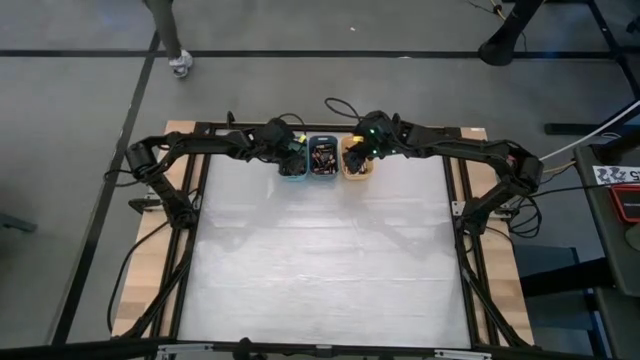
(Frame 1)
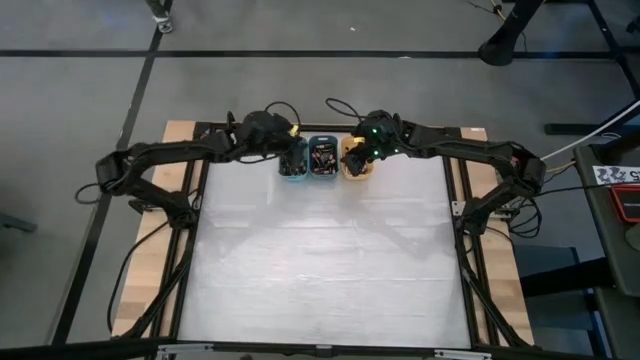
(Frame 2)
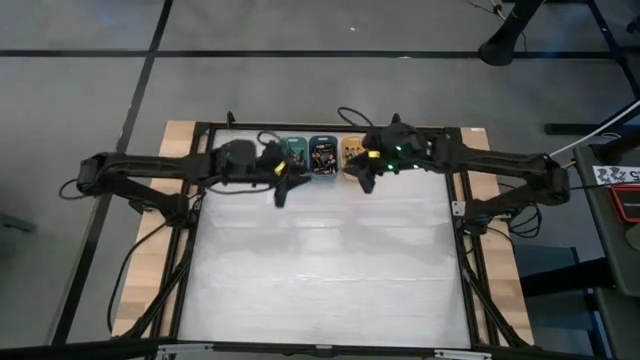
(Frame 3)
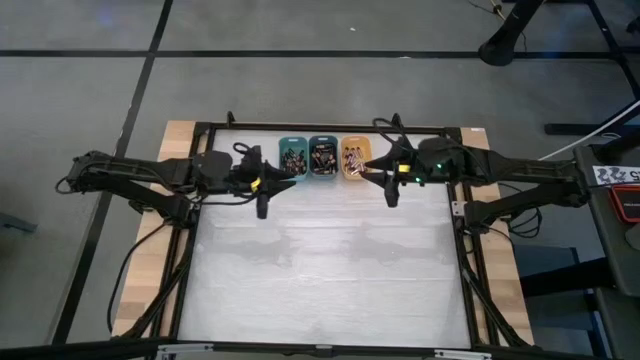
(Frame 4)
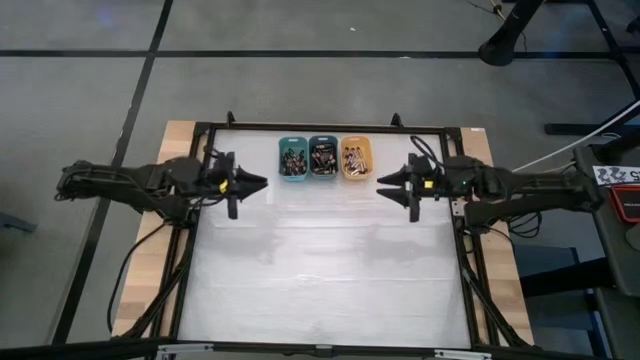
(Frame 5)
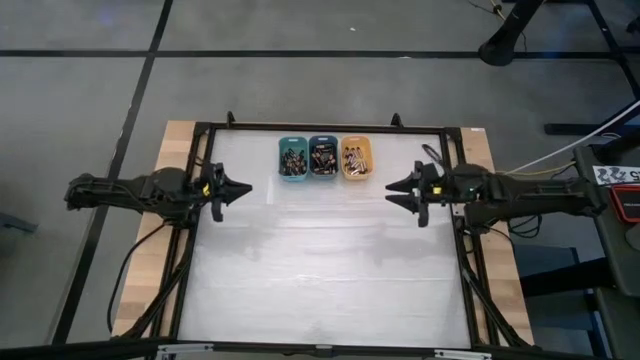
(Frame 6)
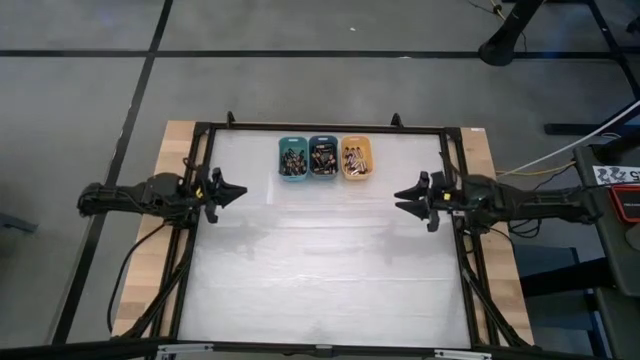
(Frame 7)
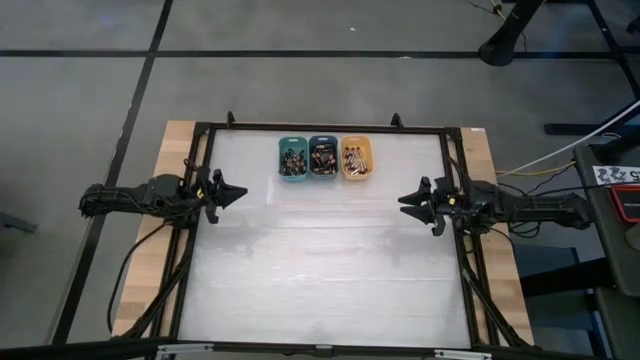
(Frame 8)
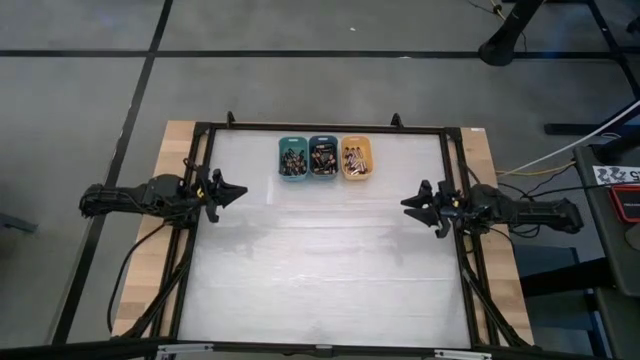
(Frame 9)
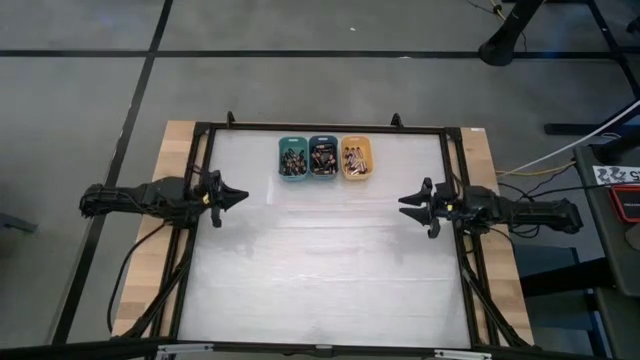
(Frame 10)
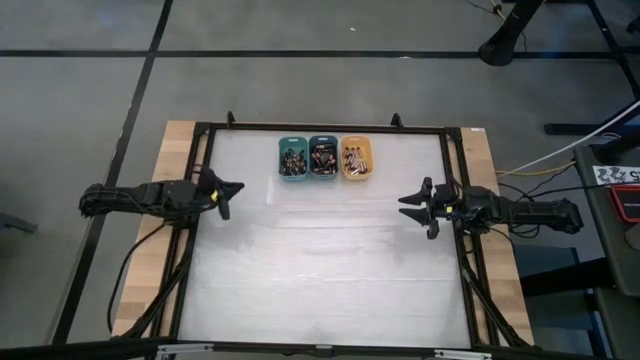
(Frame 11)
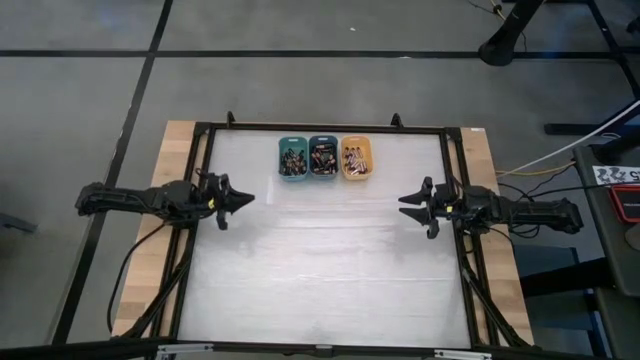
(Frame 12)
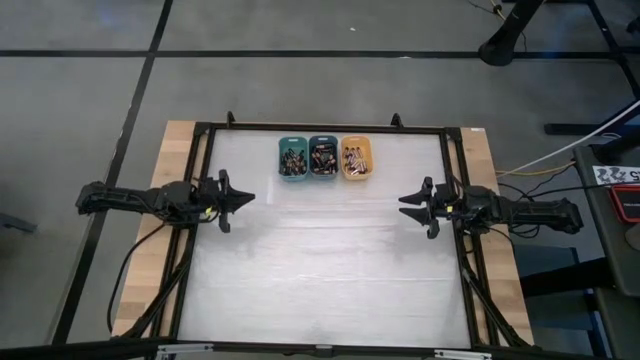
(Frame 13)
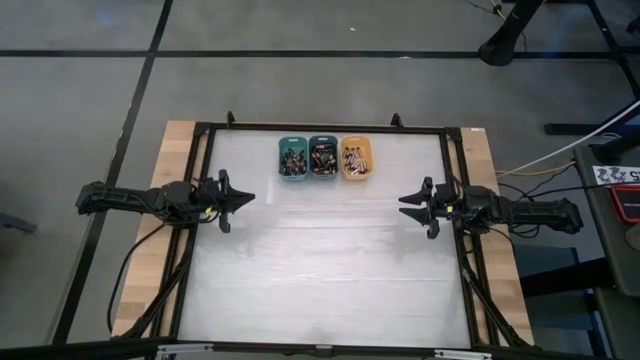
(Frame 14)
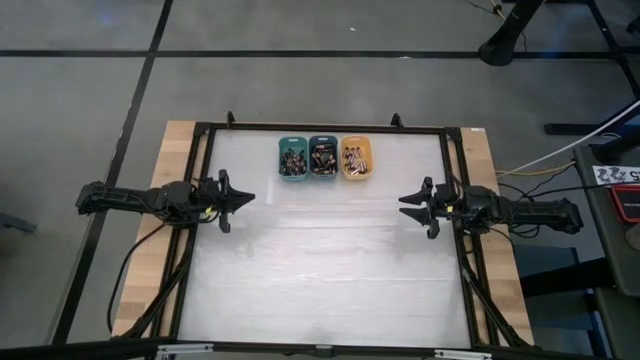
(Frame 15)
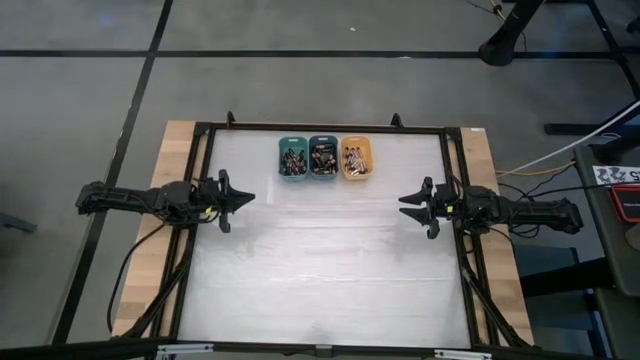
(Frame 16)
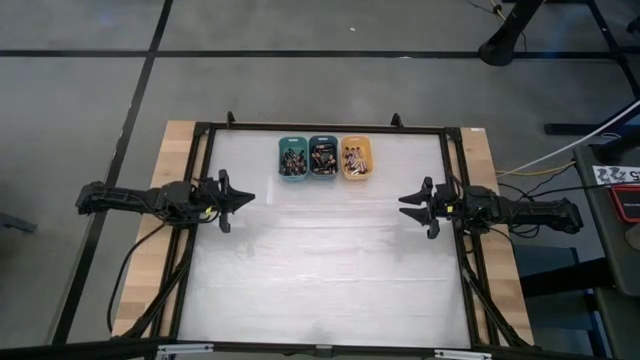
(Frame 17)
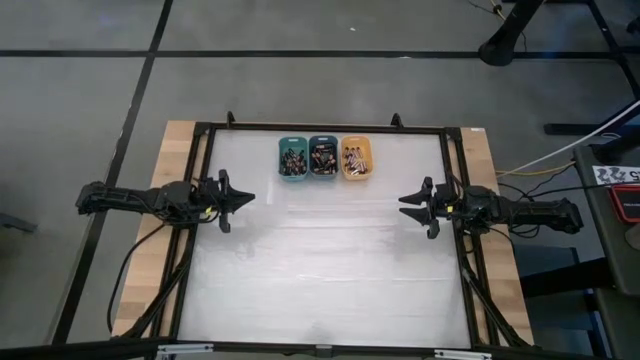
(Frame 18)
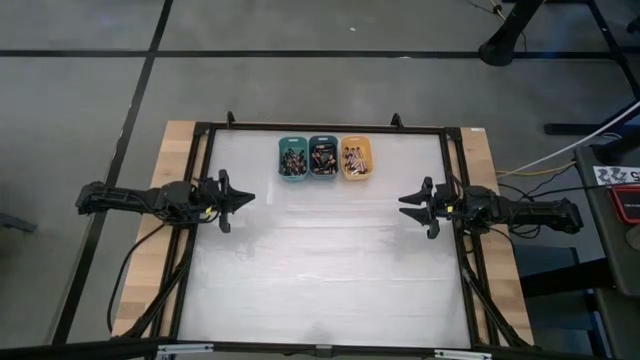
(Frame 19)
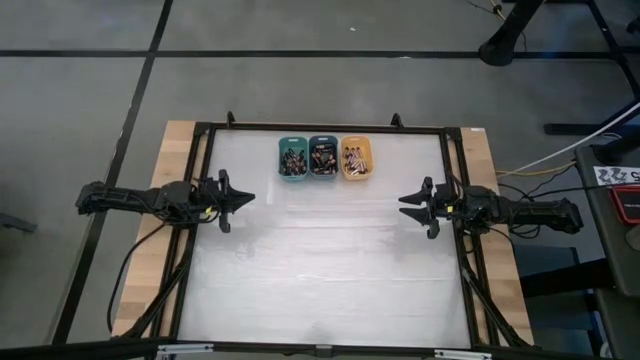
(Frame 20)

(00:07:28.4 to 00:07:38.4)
Task: Sort batteries
Return To Home Position

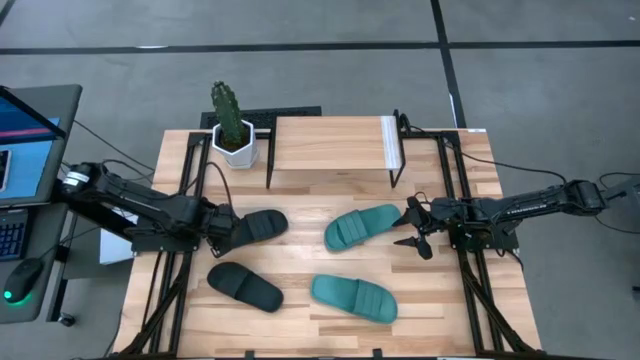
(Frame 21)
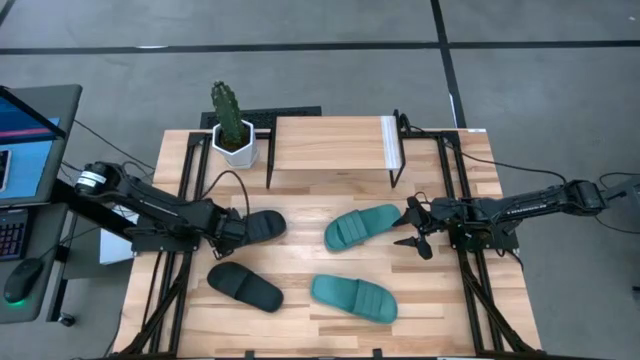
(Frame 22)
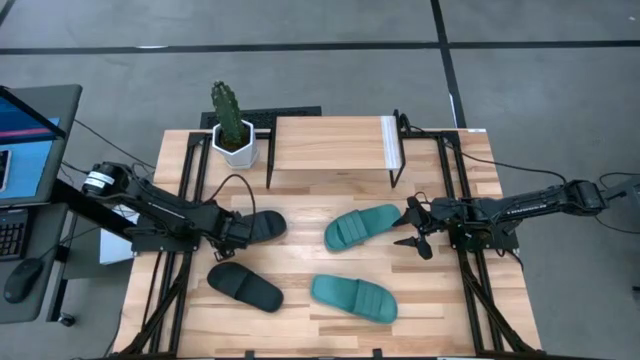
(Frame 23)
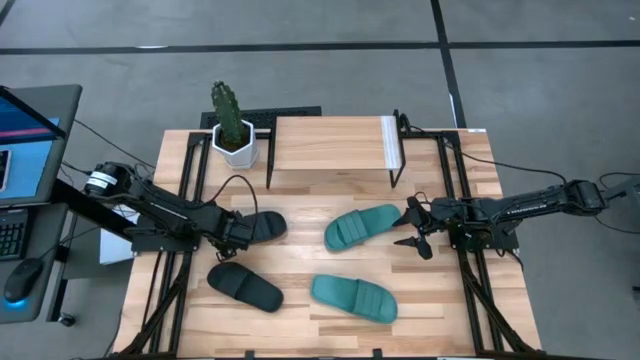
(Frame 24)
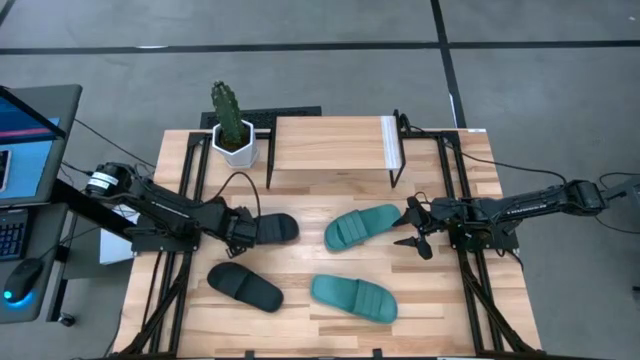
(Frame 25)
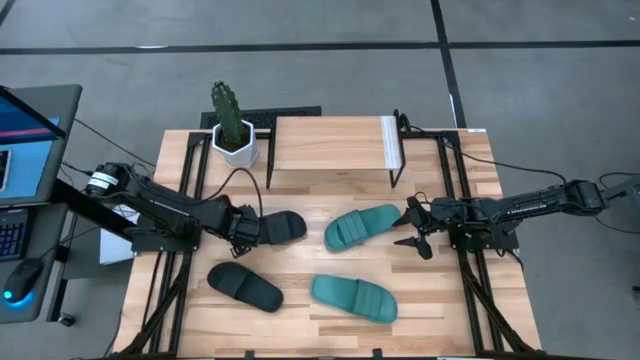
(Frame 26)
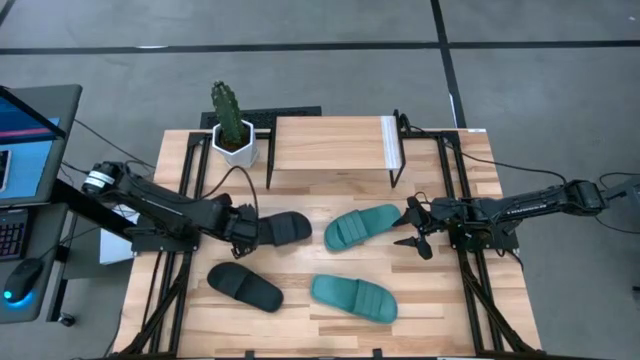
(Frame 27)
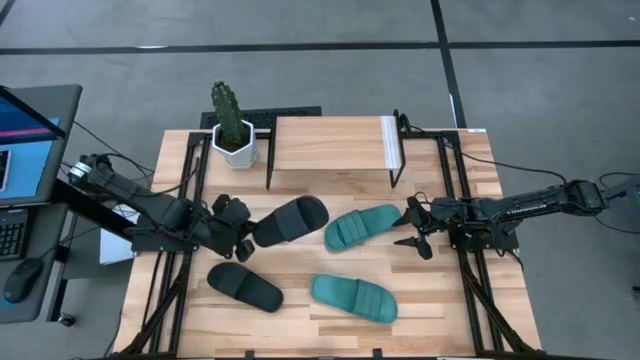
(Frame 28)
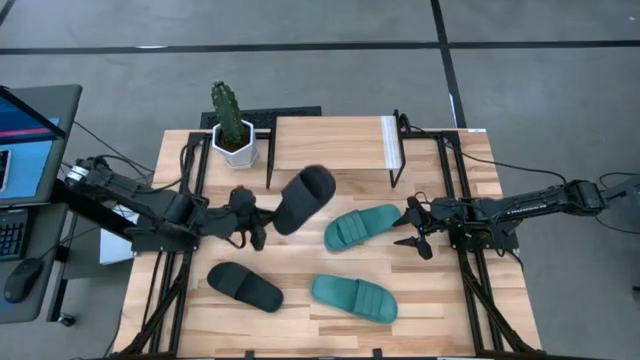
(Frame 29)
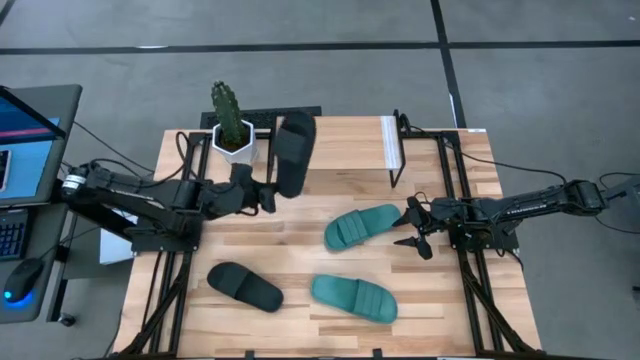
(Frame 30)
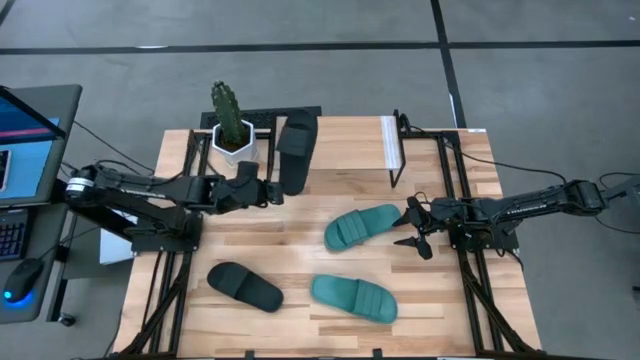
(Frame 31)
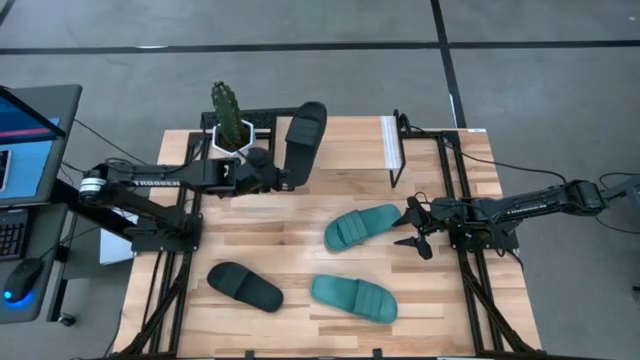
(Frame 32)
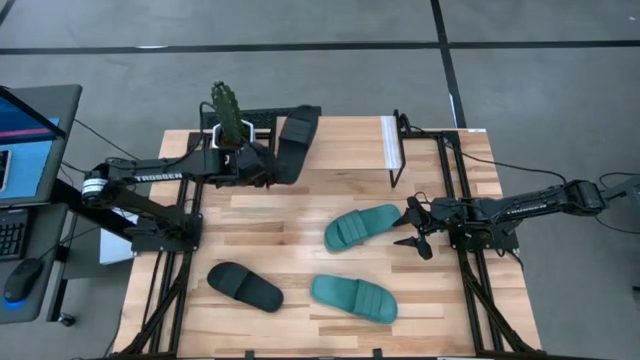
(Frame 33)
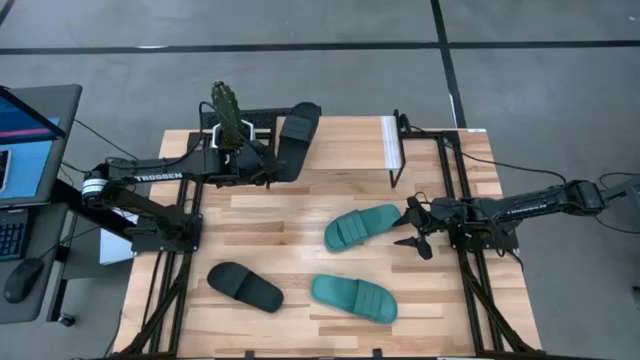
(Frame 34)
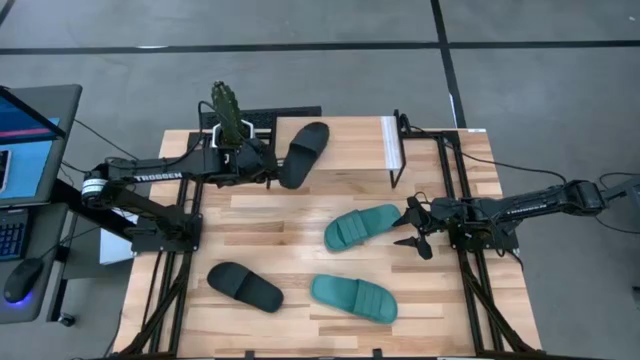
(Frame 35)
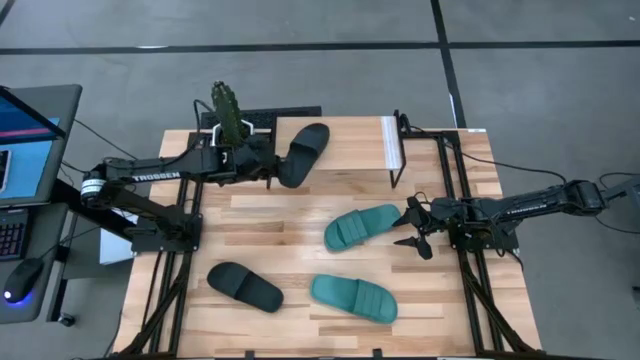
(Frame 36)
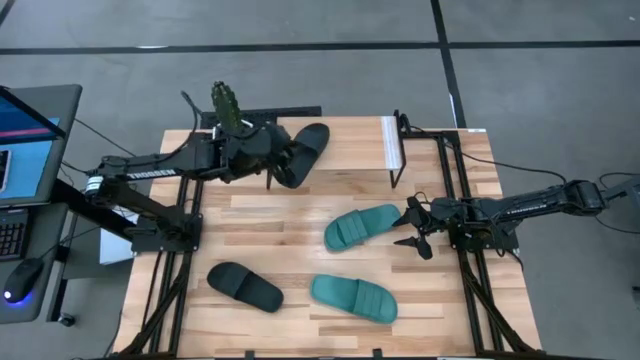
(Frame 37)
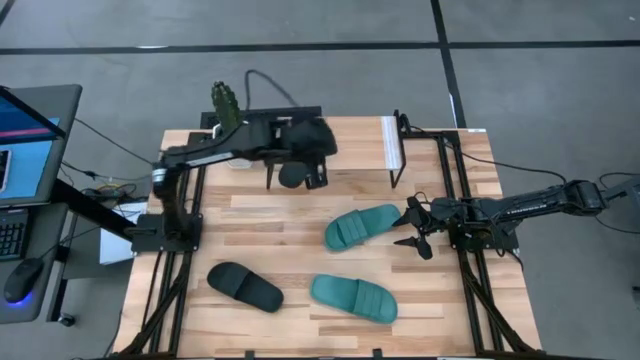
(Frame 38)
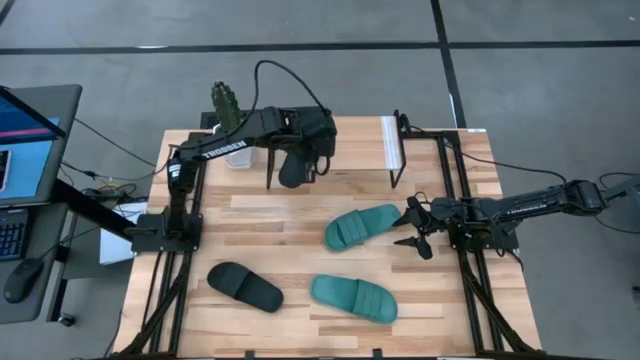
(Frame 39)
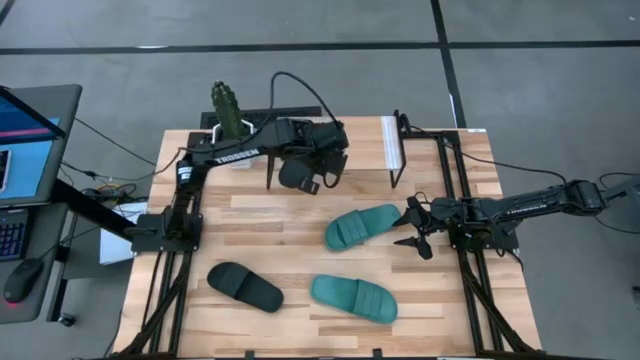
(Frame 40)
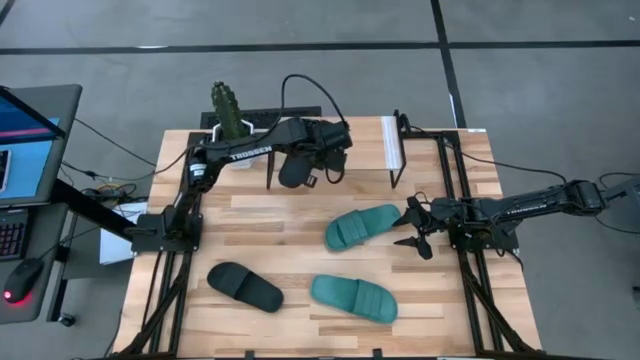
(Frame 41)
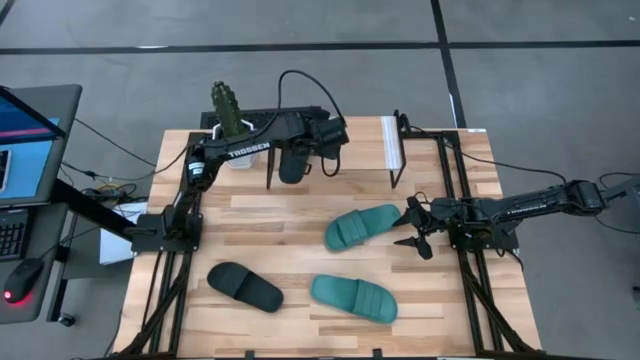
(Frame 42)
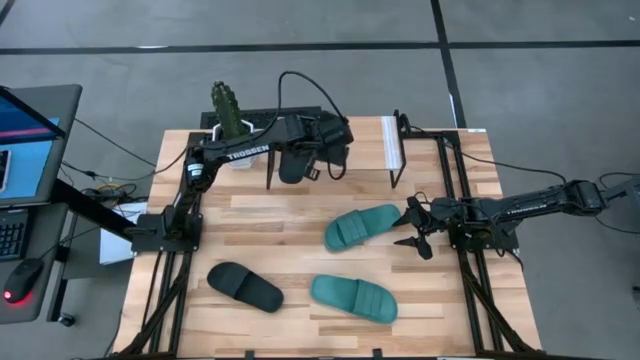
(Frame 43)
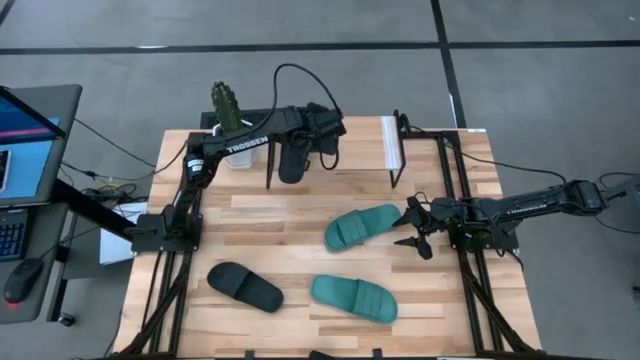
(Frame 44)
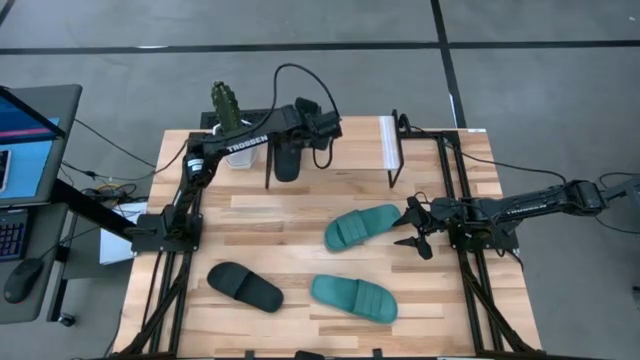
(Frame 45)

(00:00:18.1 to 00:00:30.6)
Task: Pick and place slides into the shelf
Put the top black slide on the shelf
